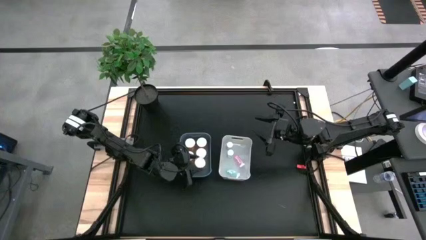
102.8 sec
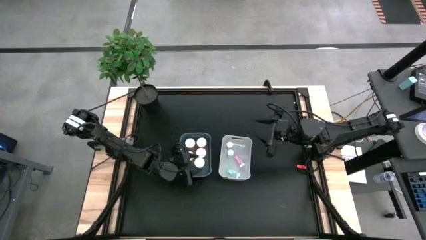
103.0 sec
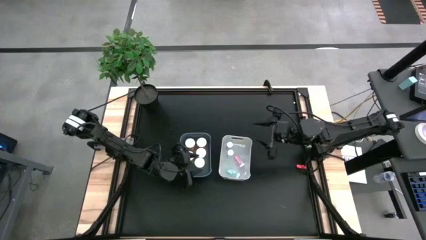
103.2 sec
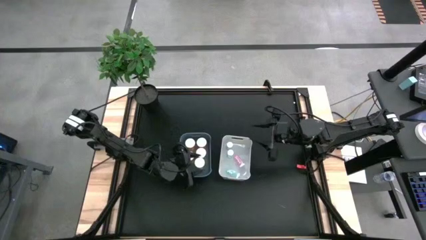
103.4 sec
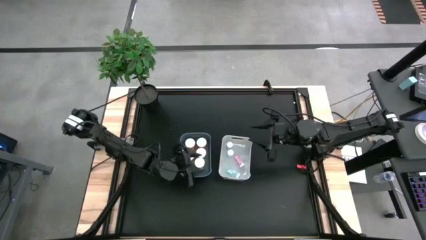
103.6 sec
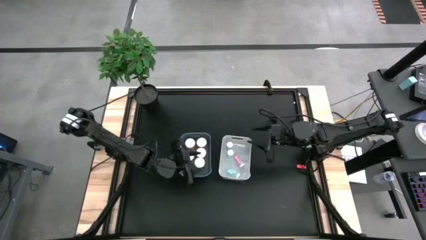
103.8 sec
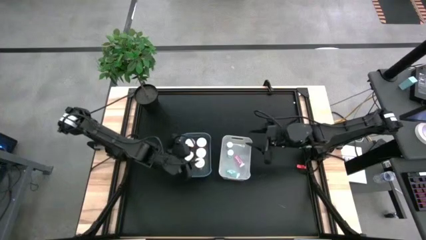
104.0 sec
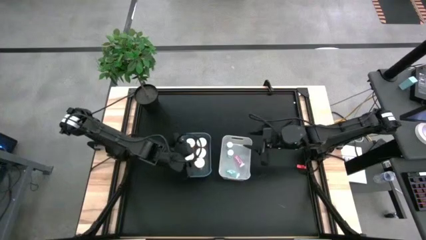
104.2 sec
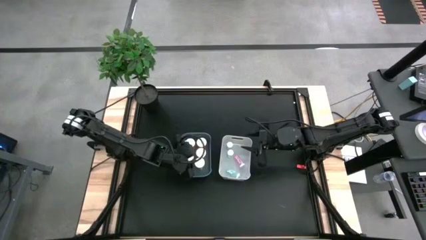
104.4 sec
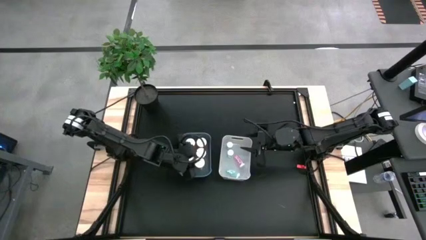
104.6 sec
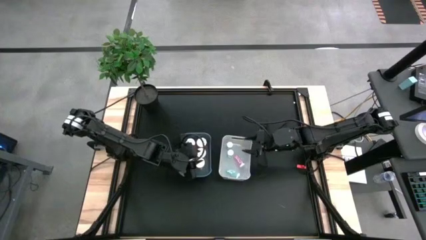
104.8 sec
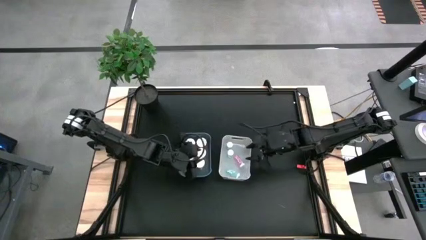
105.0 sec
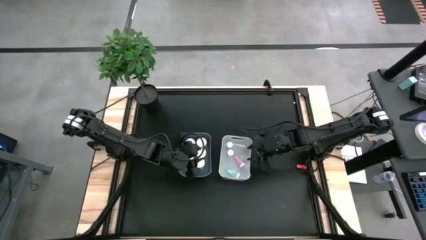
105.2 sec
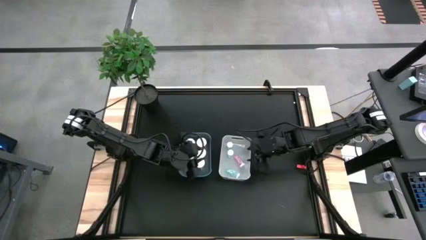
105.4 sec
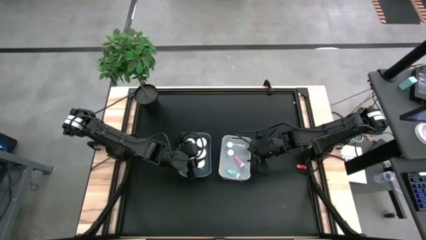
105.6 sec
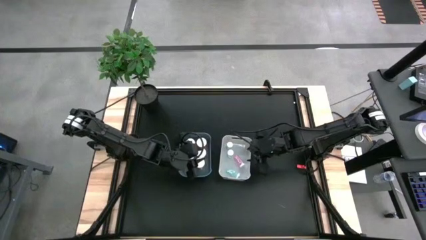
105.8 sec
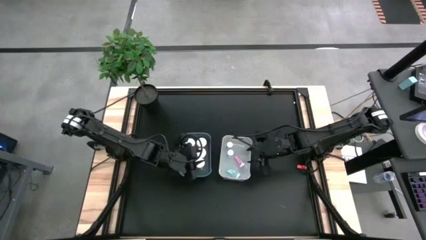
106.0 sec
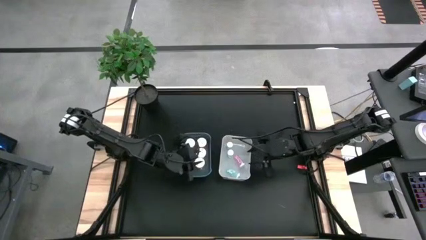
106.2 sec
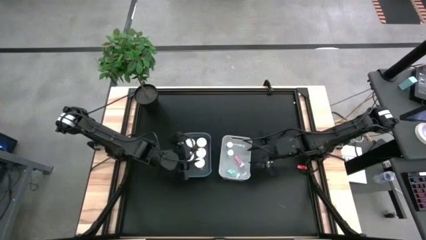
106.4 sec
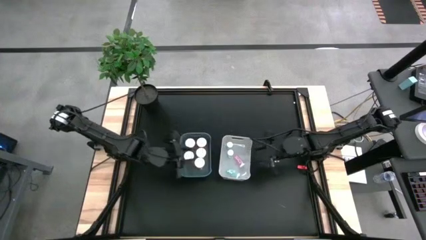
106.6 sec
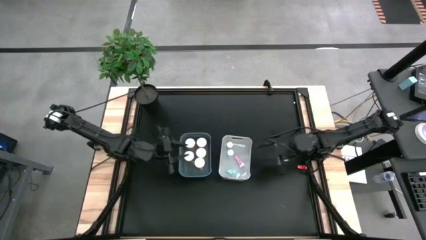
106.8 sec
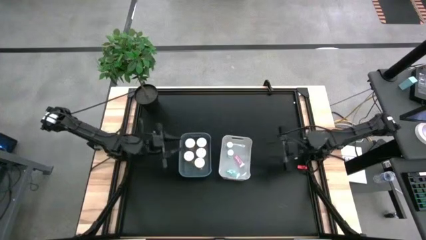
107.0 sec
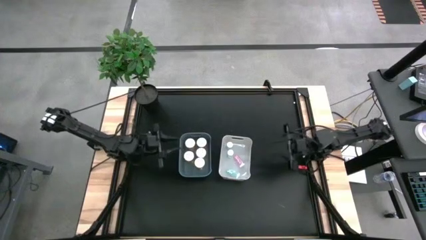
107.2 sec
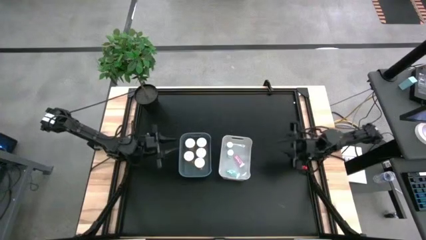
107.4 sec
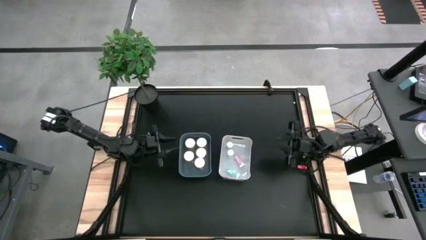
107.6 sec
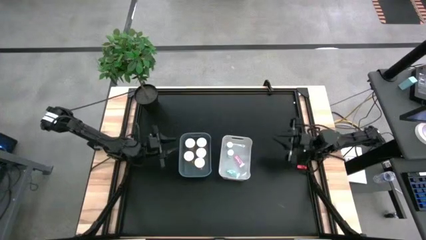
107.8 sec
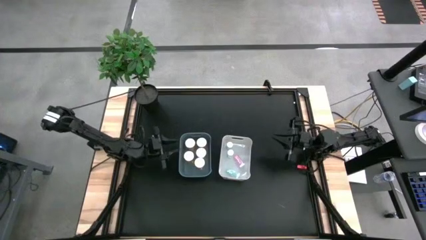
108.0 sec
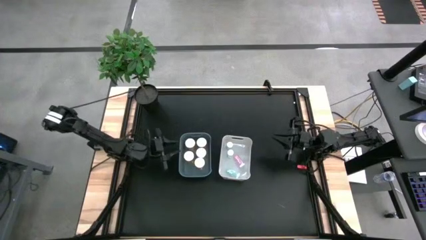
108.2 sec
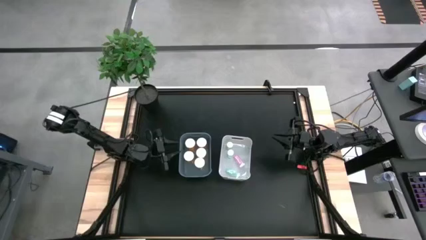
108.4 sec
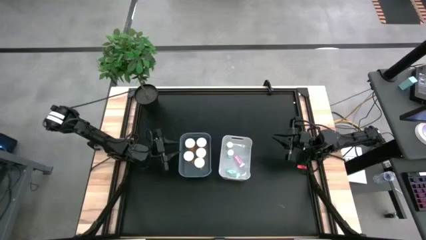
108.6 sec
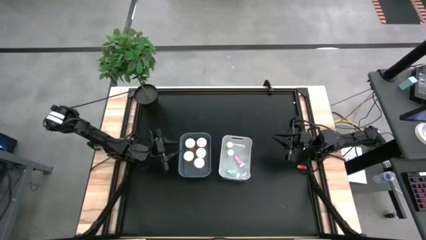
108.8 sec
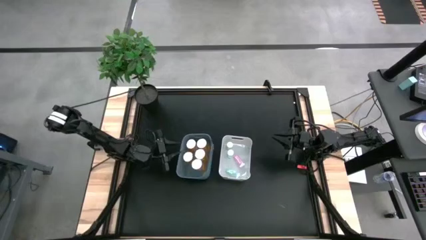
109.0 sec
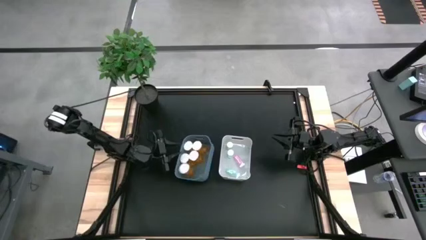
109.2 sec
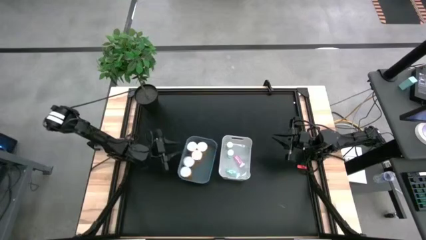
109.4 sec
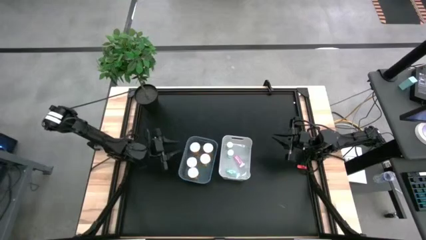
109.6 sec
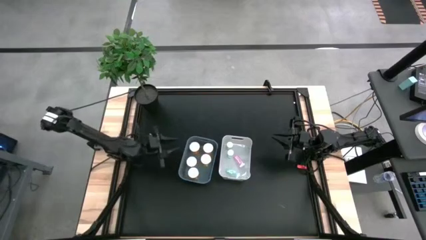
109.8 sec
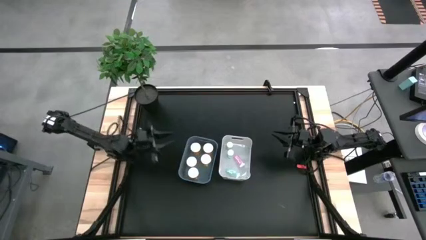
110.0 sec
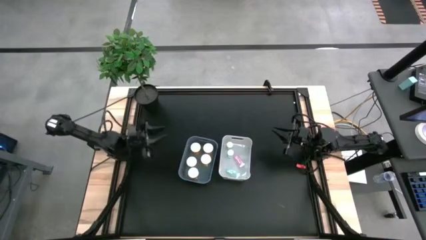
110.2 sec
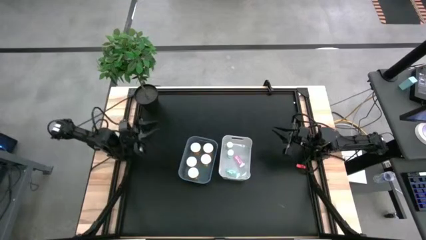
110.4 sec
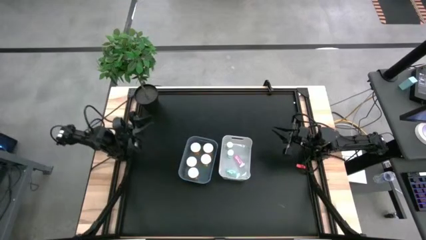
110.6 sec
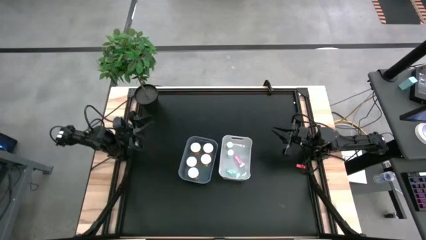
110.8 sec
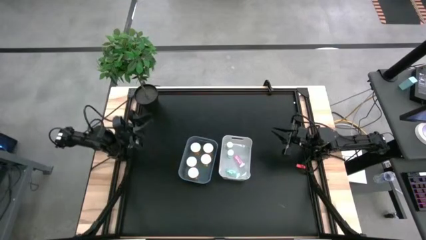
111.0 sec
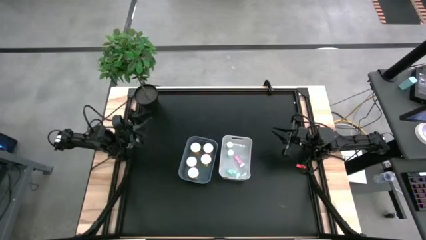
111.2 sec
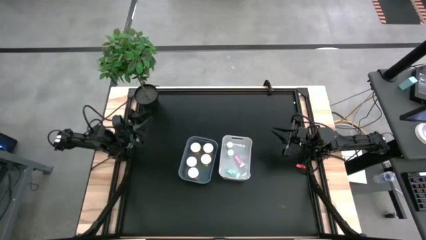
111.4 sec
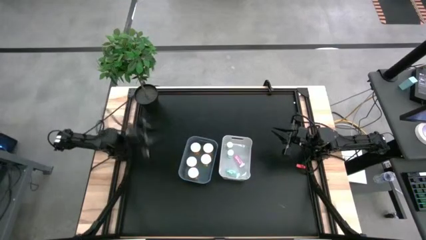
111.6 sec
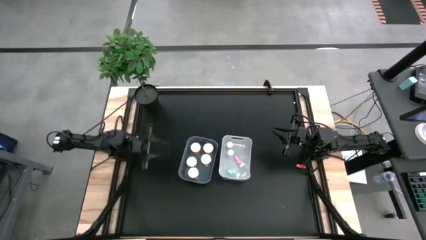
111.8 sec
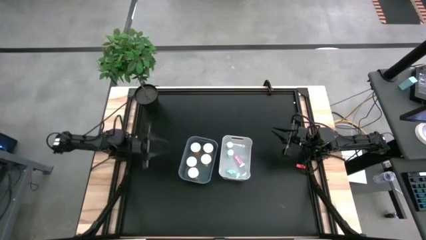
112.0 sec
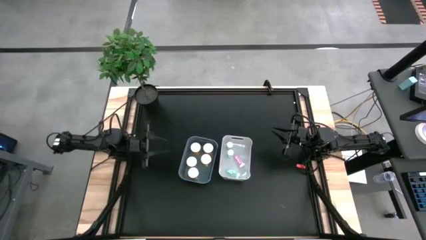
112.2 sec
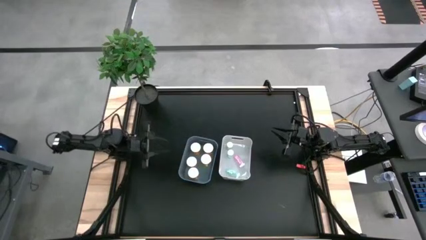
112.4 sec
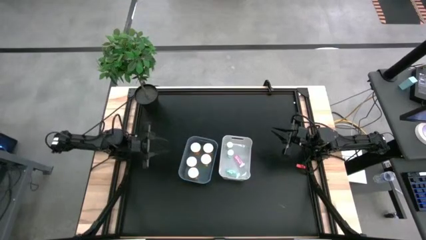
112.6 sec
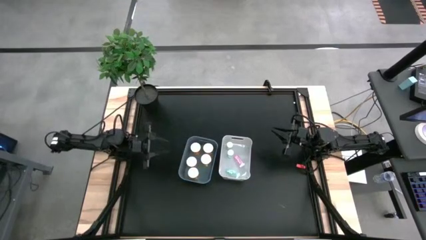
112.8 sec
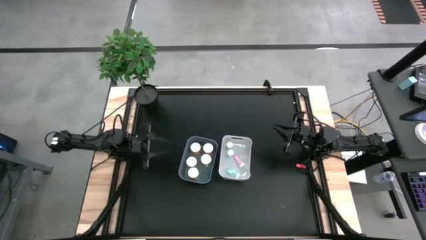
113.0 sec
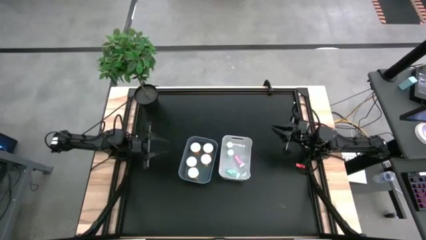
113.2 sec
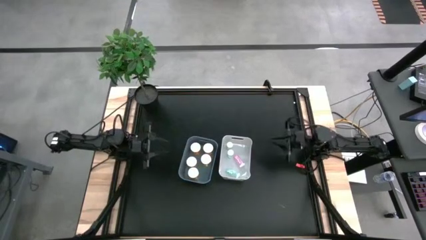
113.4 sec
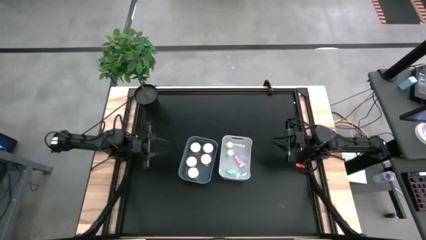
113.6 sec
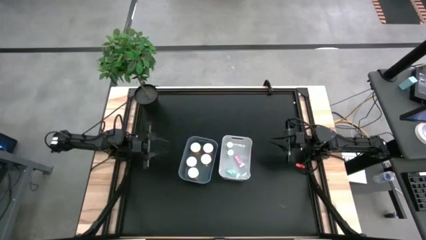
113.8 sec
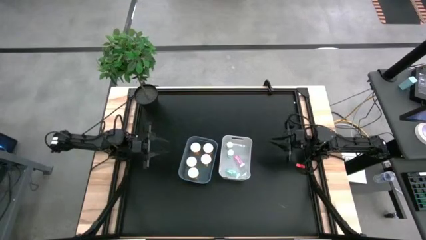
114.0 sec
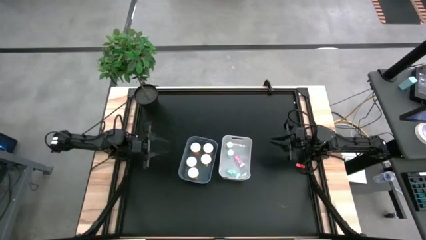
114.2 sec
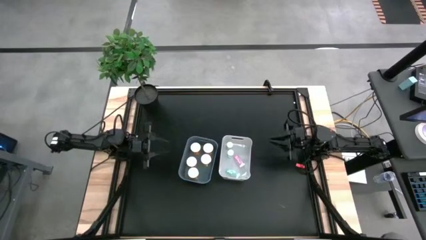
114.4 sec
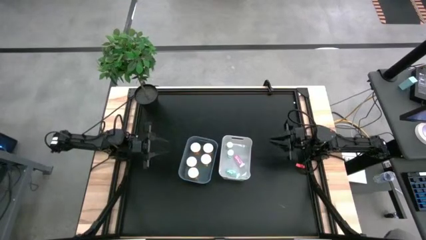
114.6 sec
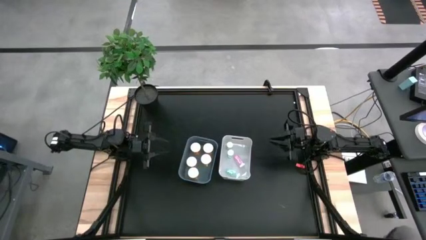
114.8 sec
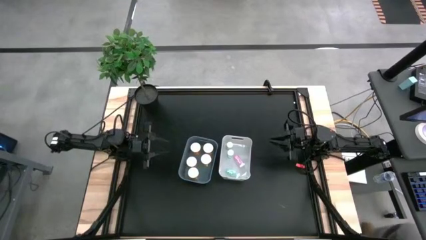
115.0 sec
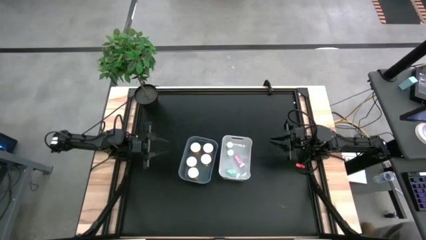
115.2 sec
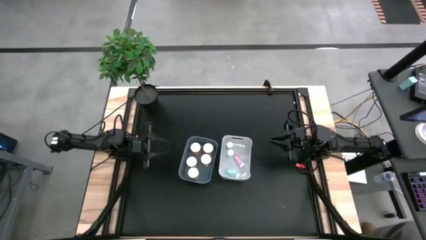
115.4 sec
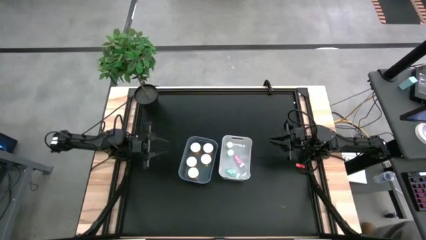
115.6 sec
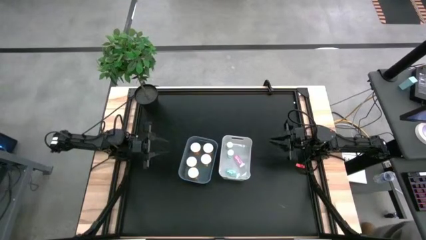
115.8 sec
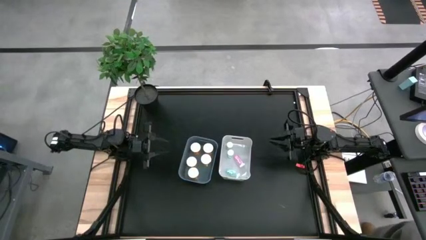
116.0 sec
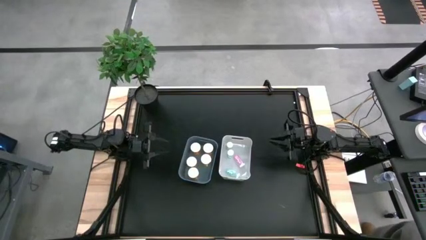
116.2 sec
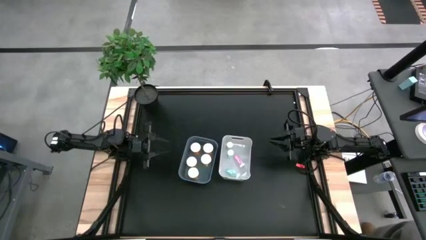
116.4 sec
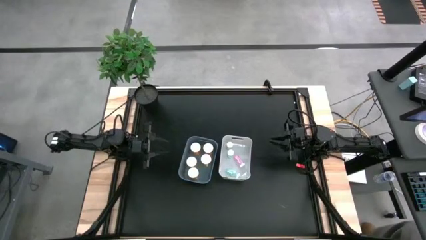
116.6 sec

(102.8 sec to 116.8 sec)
Task: Pick and place medicine bottles into bin by pill shape (circle, oval)
Return to Home Position

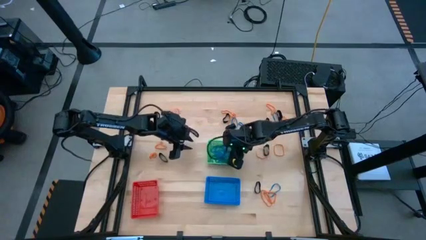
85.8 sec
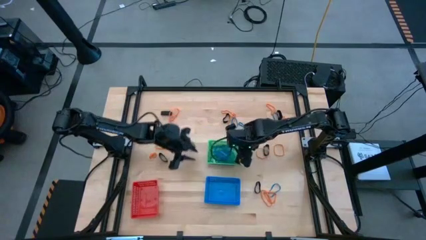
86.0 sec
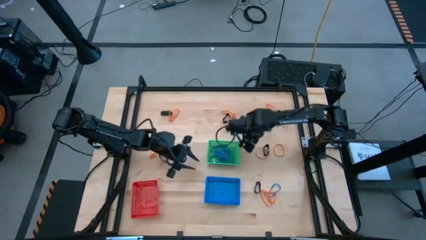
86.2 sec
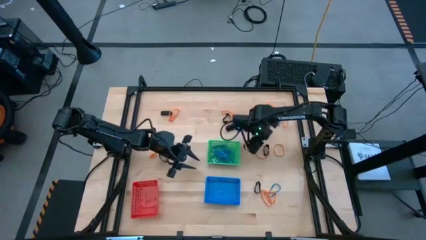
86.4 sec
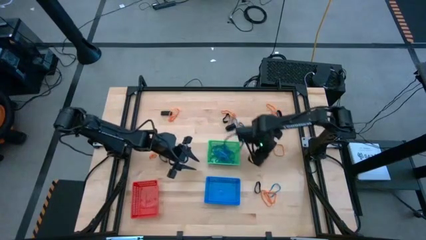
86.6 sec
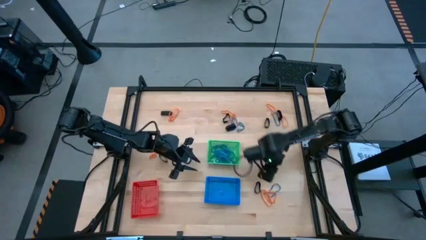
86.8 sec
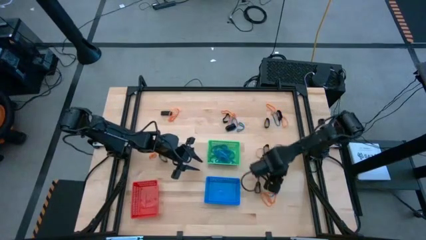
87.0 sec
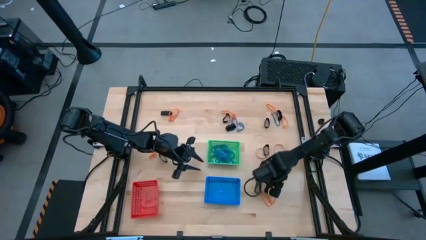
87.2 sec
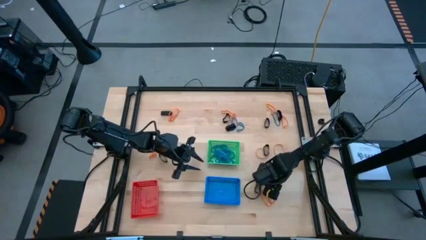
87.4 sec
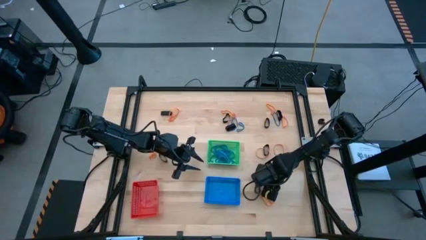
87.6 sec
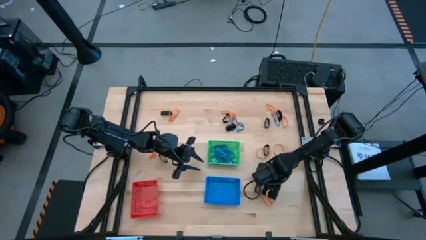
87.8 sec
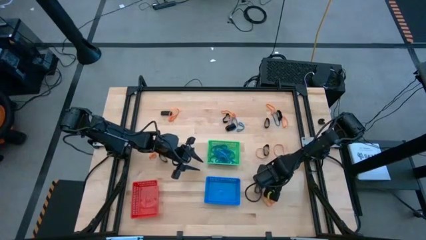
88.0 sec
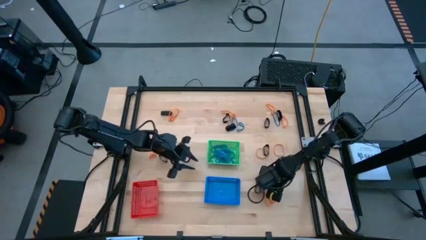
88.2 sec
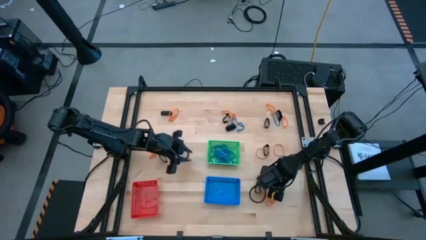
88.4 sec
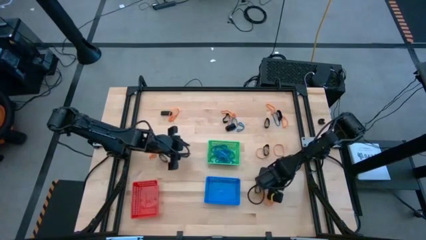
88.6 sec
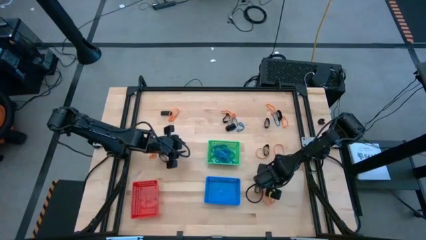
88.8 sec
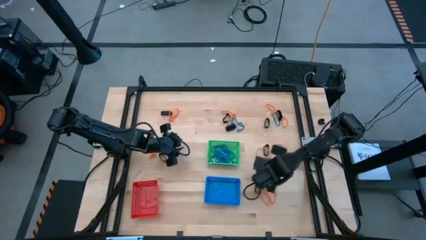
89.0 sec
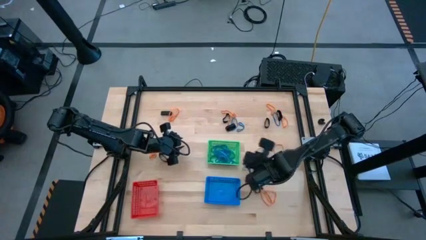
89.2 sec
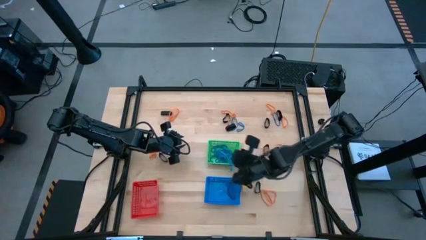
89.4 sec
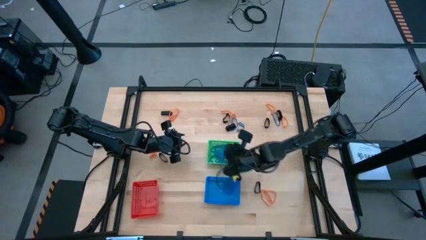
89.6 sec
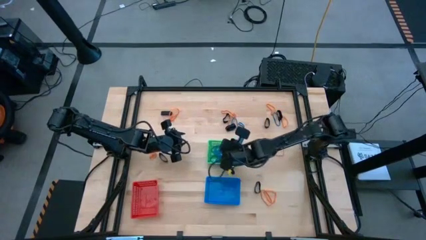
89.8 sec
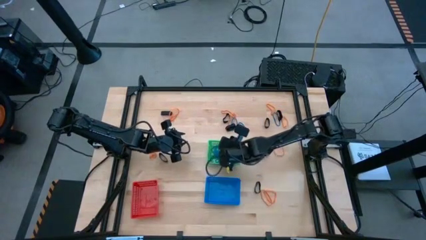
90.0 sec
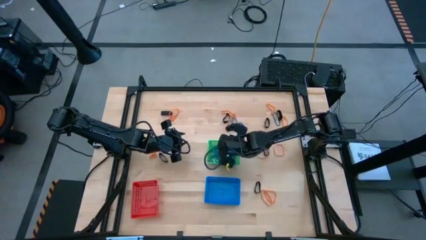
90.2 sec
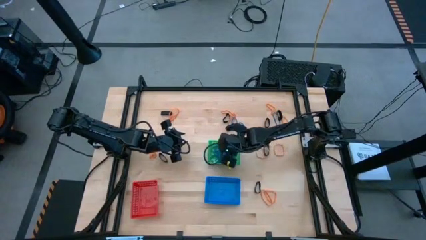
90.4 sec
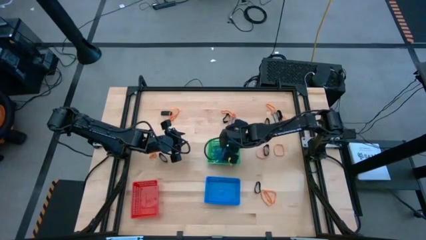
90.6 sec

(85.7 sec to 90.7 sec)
Task: Sort rubber bands into baskets
Put the blue rubberband into the green bin
